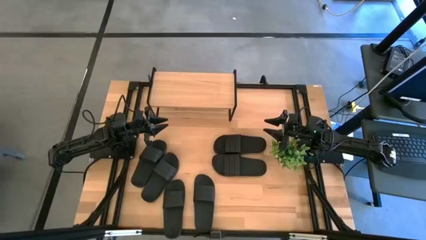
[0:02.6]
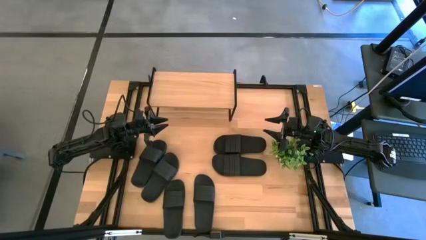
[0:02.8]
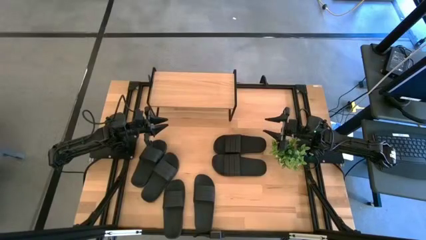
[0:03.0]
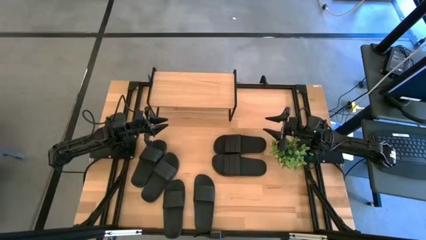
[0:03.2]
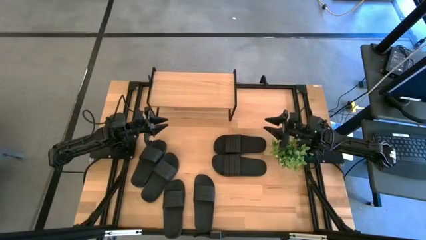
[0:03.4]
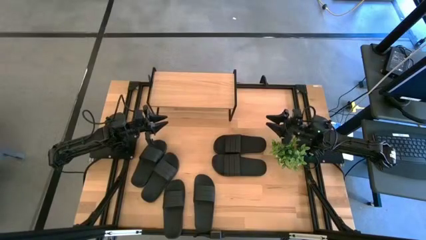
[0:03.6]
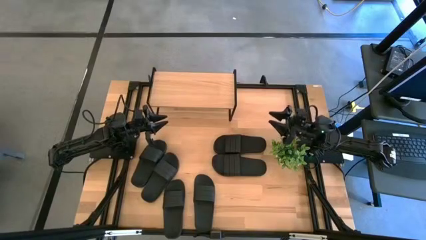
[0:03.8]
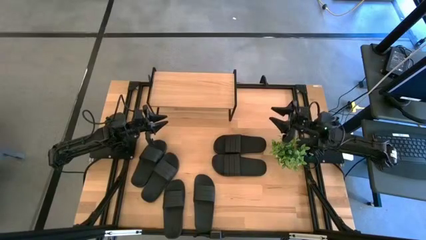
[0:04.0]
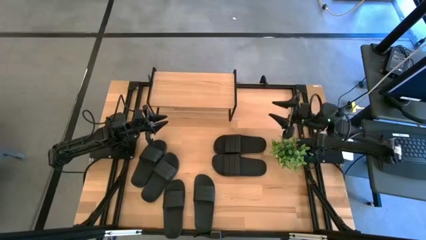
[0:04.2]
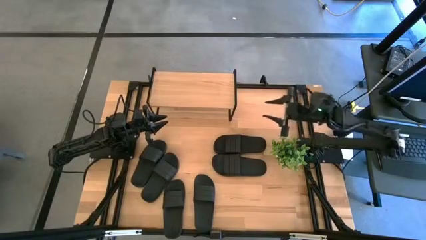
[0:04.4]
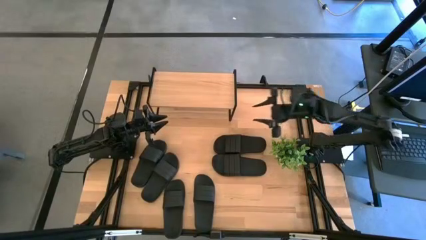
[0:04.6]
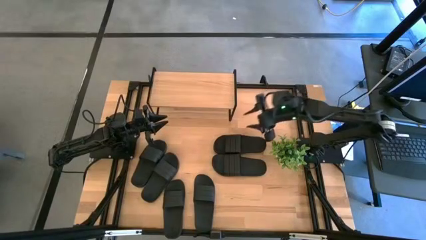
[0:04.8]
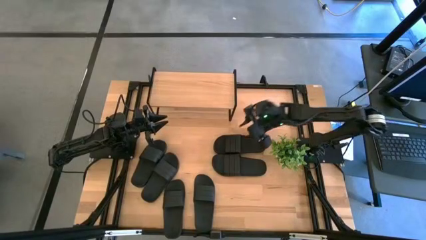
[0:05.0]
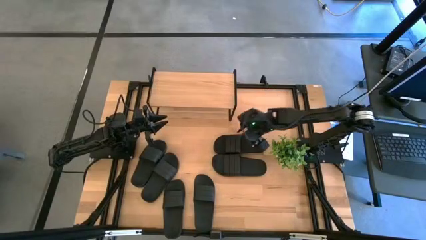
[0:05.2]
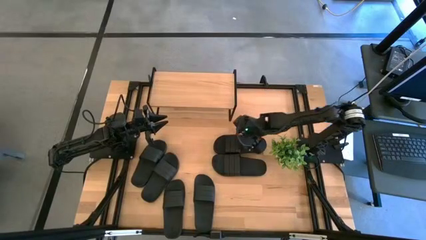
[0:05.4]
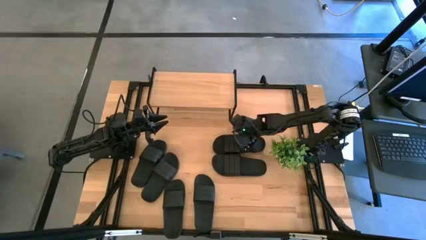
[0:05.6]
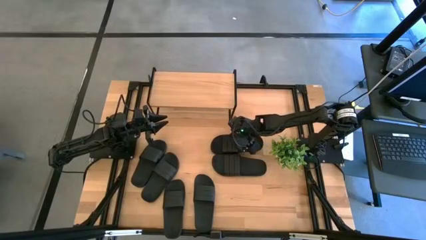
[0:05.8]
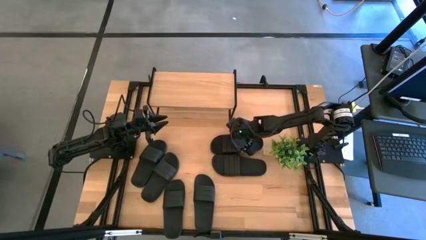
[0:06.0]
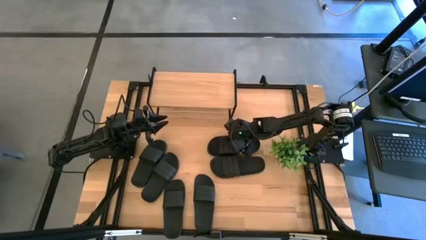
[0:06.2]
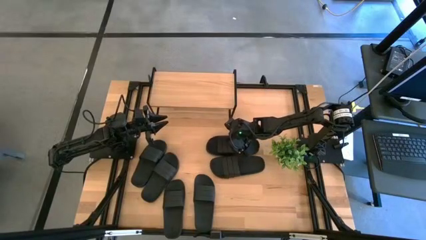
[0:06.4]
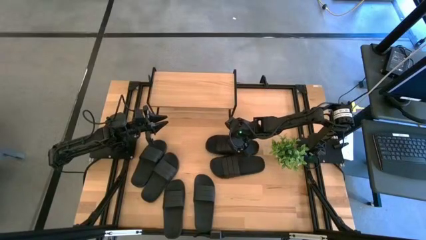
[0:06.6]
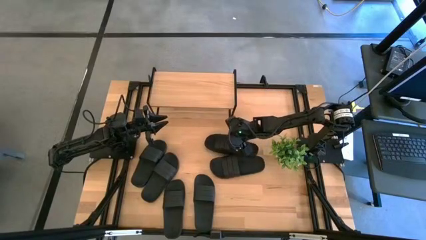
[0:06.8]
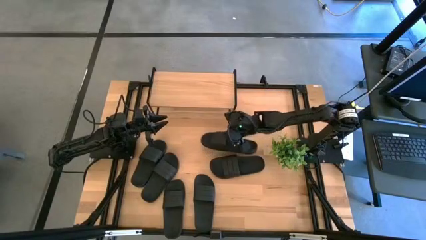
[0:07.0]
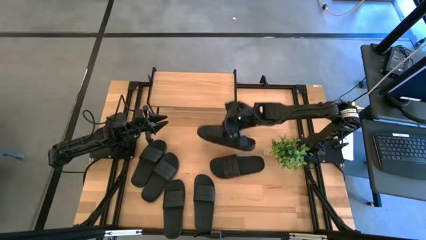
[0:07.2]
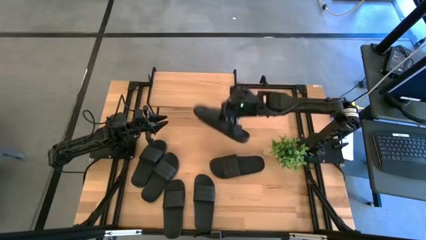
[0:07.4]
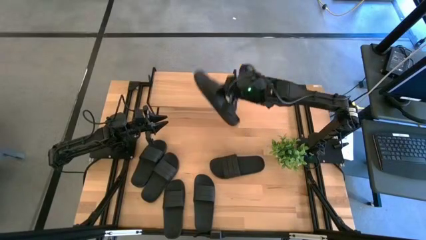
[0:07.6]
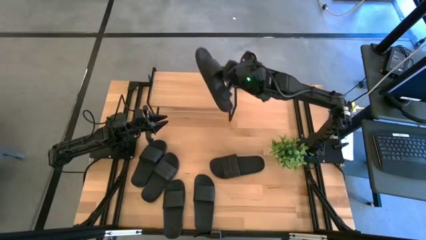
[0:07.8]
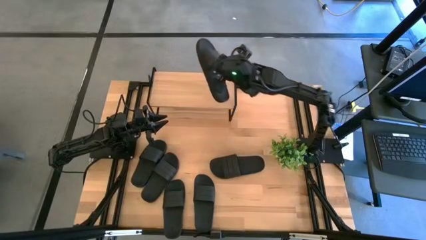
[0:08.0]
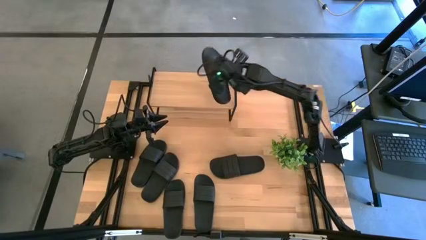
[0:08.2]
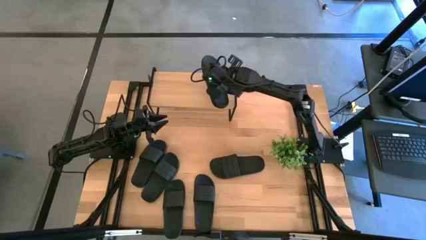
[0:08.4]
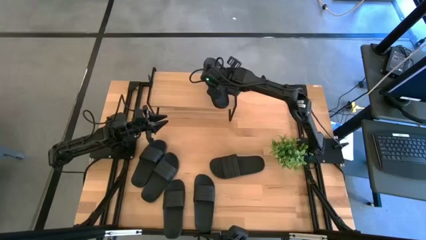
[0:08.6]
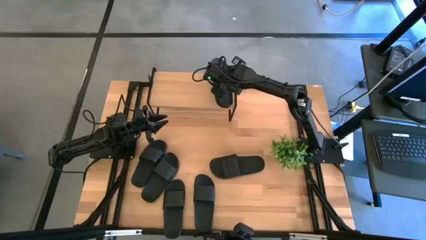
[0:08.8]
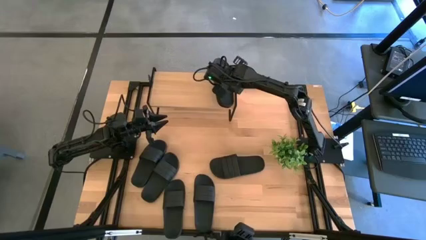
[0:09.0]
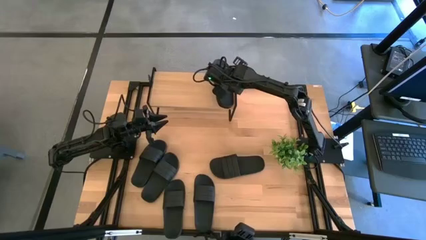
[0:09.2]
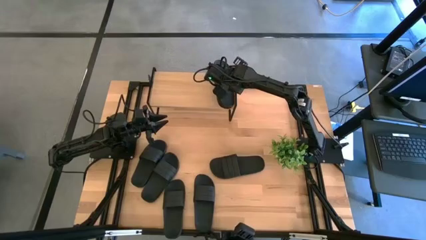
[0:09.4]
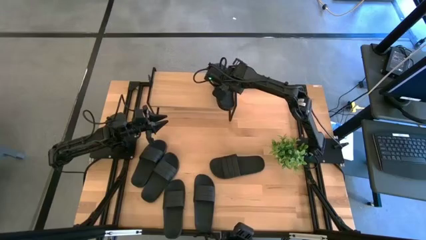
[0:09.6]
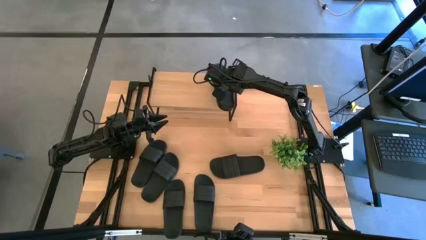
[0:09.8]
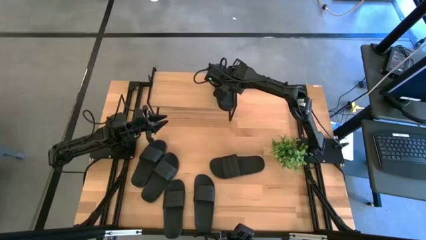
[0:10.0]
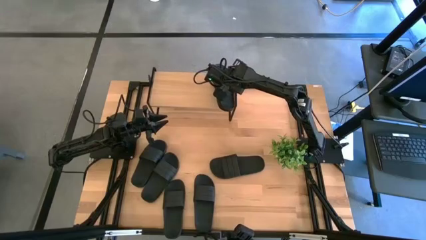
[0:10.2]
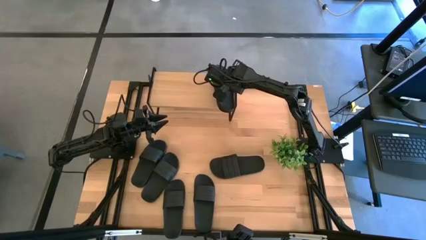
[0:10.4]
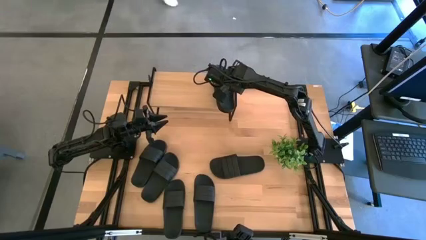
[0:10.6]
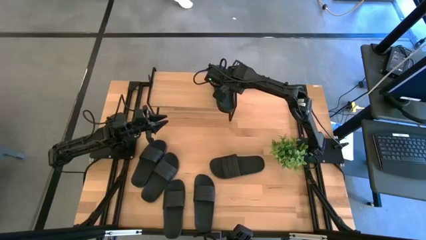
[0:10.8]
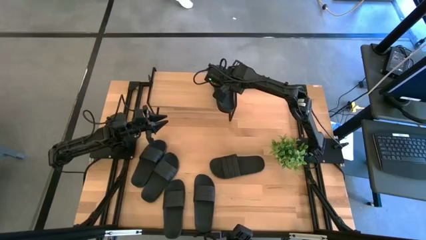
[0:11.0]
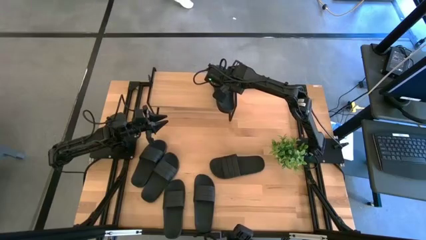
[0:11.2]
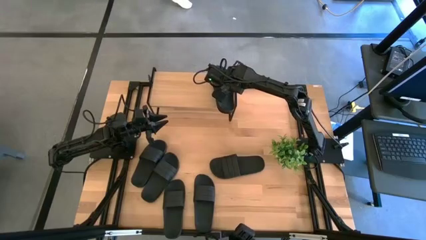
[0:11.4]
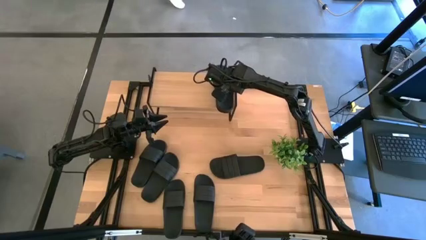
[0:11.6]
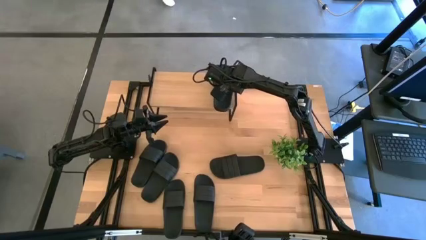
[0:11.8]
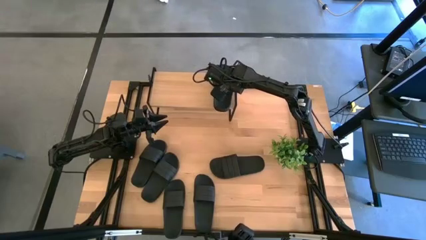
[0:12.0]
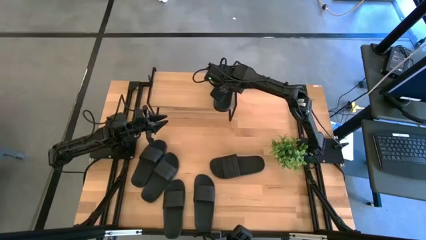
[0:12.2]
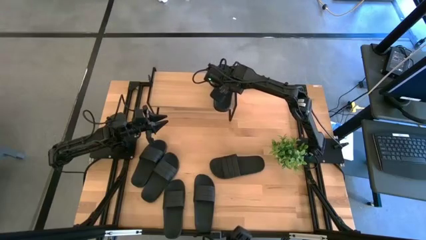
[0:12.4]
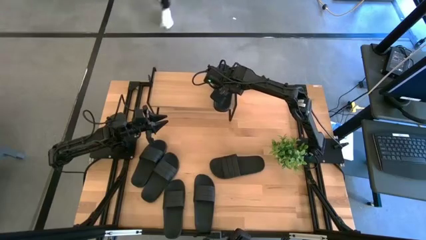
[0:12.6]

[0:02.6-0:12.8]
Task: Pick and place slides into the shelf
Put the black slipper on the shelf

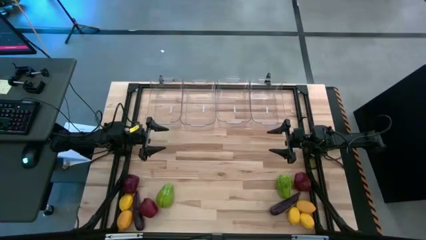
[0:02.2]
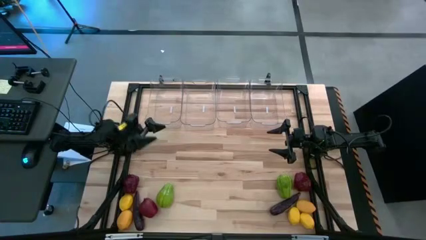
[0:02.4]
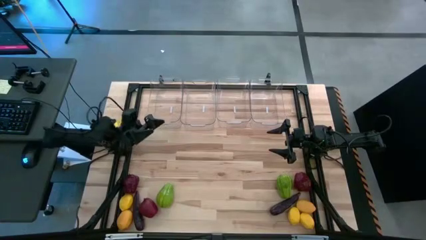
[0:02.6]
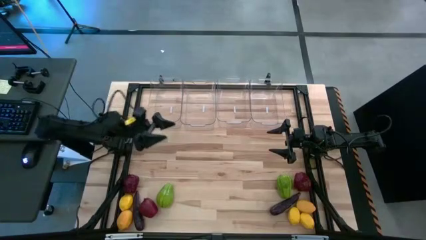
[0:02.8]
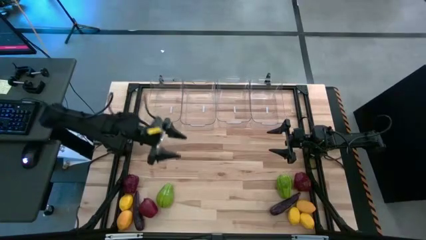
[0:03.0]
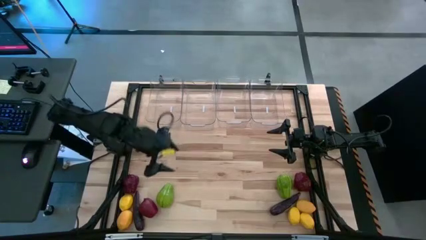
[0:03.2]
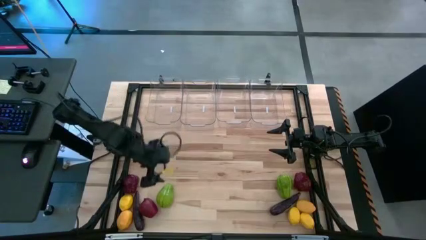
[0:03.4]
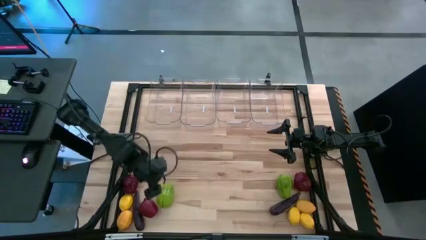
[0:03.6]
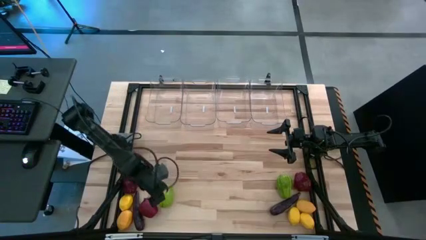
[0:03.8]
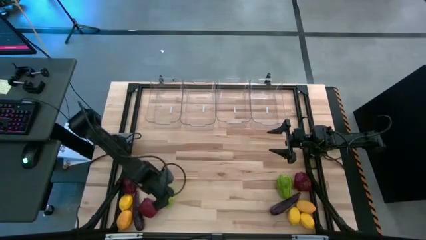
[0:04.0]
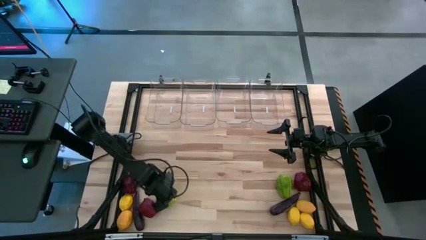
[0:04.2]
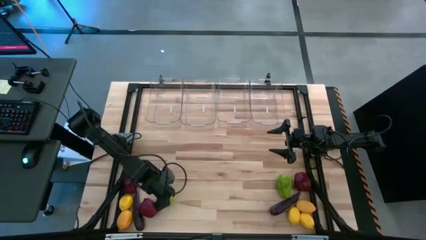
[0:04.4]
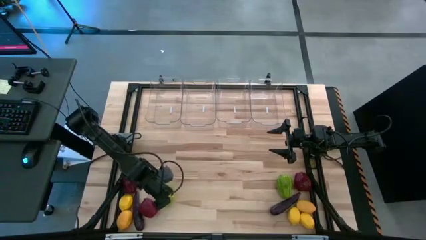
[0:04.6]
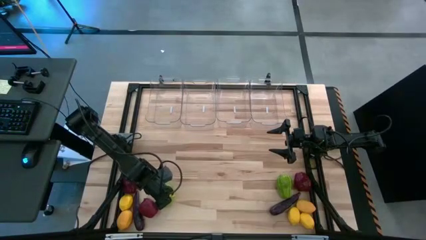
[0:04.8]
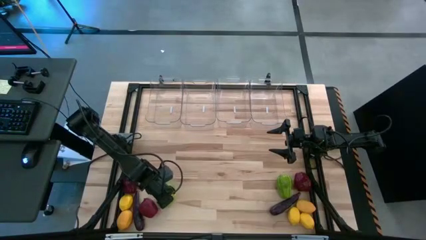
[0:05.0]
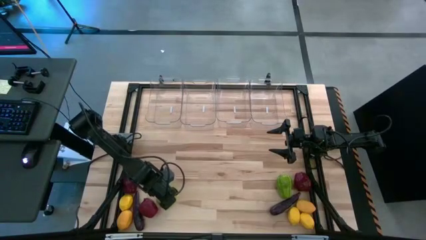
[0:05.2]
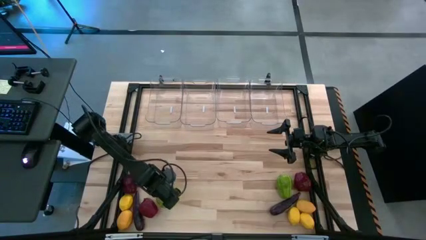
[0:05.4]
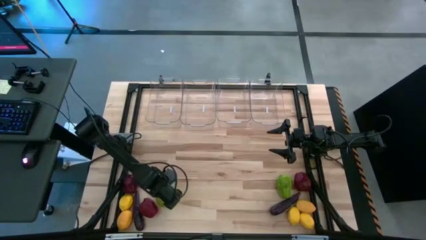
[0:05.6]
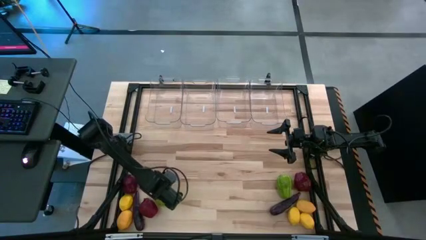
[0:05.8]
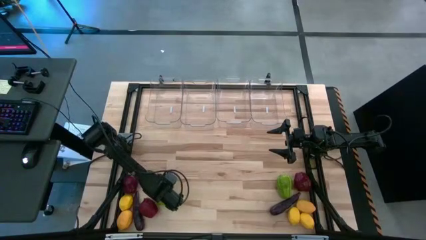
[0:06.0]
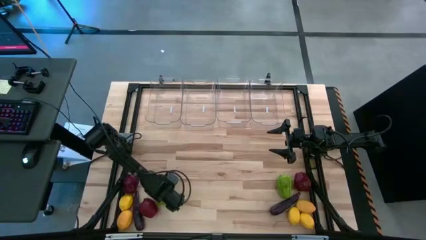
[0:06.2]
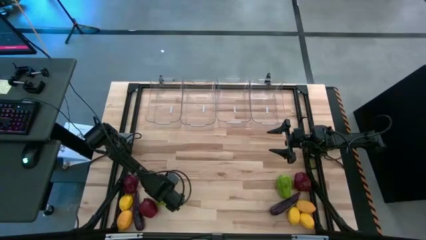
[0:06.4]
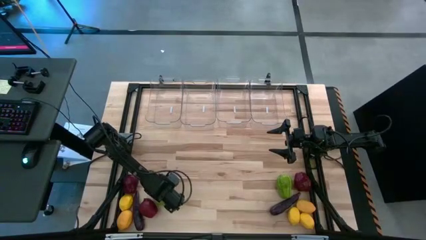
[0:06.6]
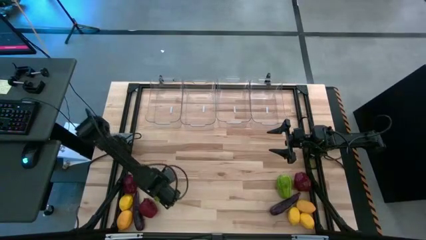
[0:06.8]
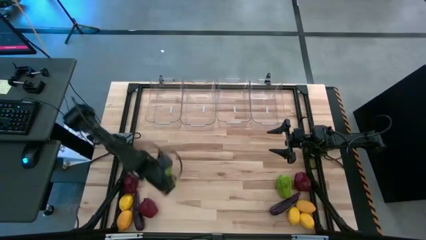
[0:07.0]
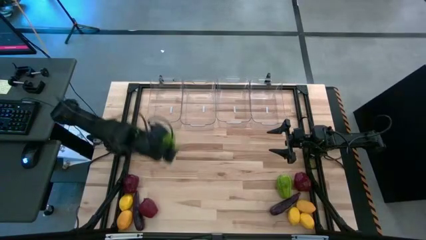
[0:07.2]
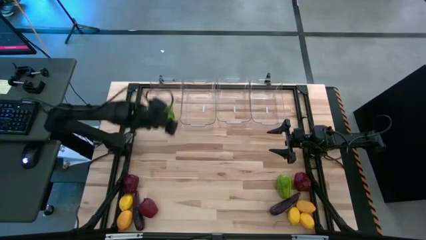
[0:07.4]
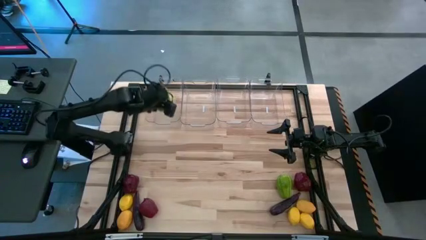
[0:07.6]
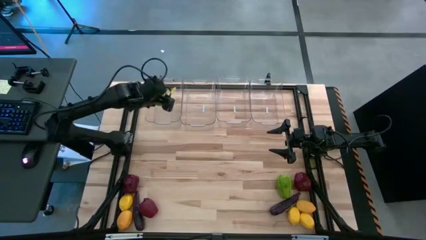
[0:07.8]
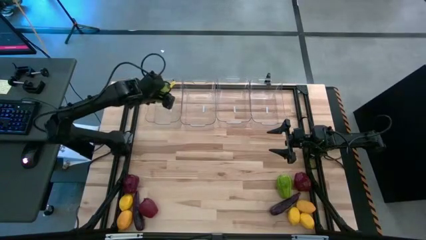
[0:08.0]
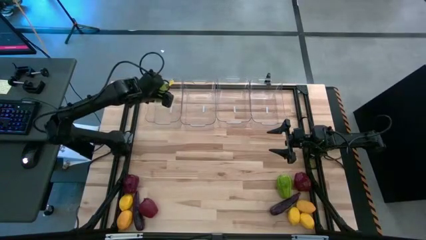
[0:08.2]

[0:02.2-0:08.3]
Task: Sort produce into baskets
Put the chayote into the left transparent bin
